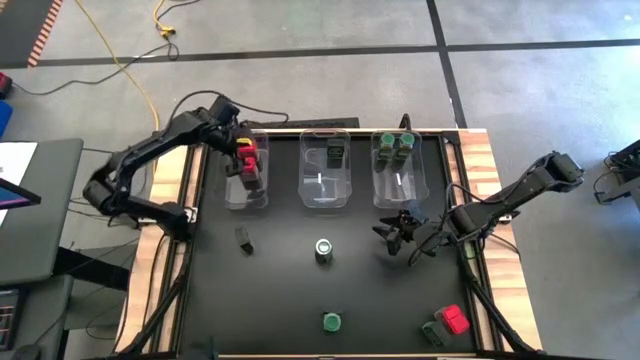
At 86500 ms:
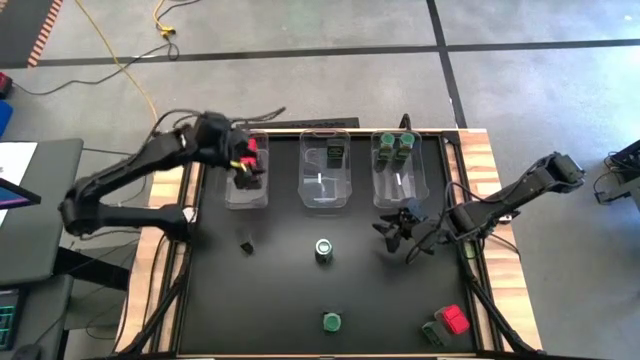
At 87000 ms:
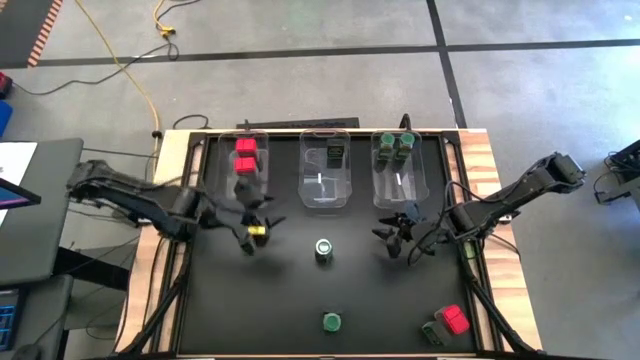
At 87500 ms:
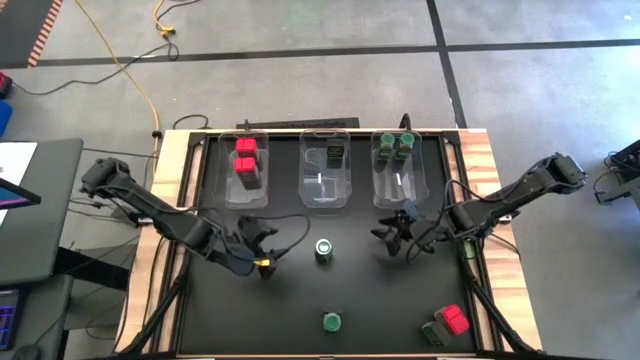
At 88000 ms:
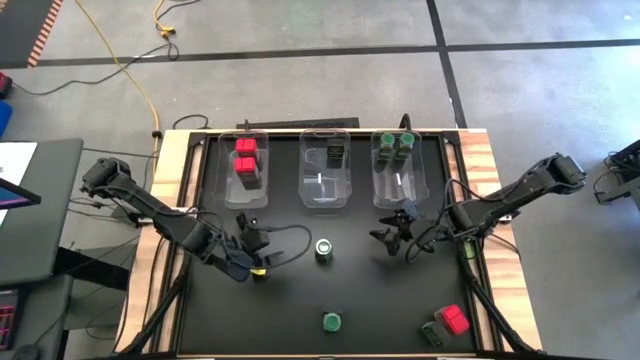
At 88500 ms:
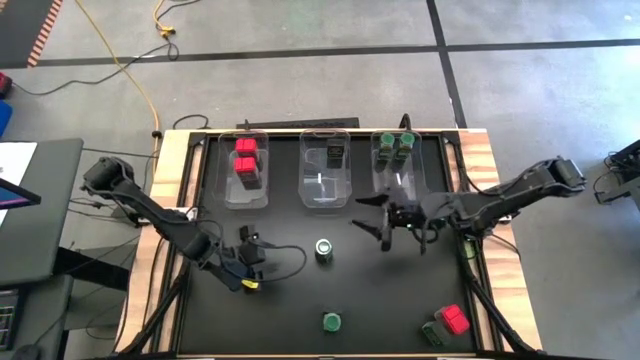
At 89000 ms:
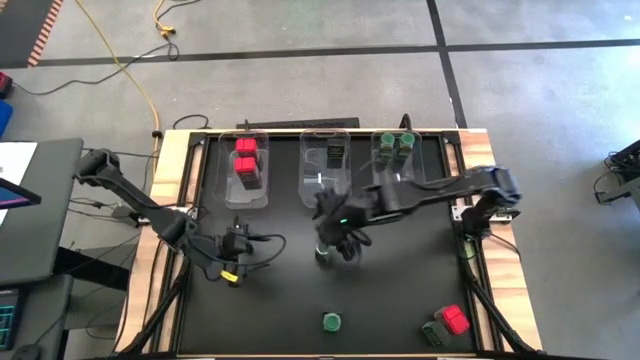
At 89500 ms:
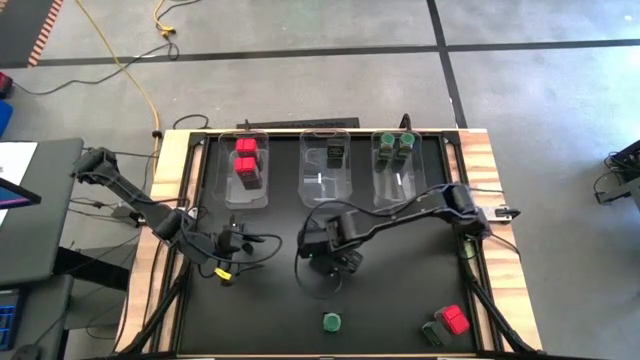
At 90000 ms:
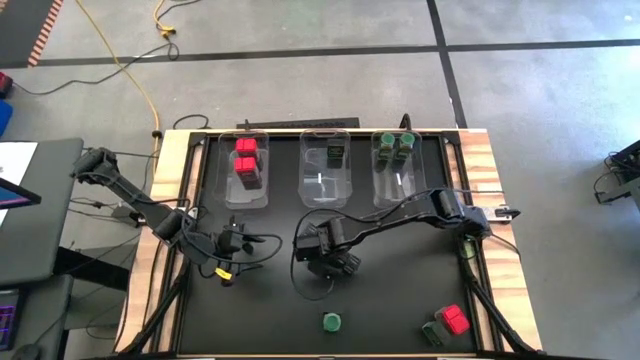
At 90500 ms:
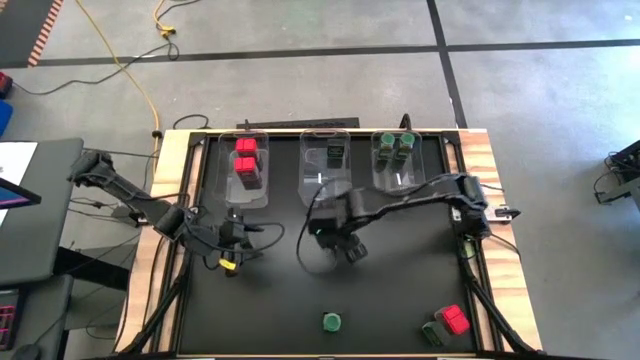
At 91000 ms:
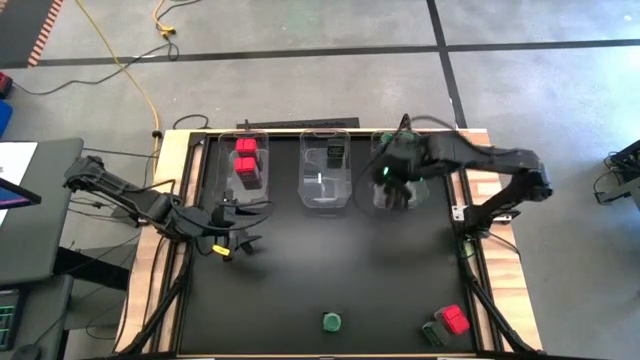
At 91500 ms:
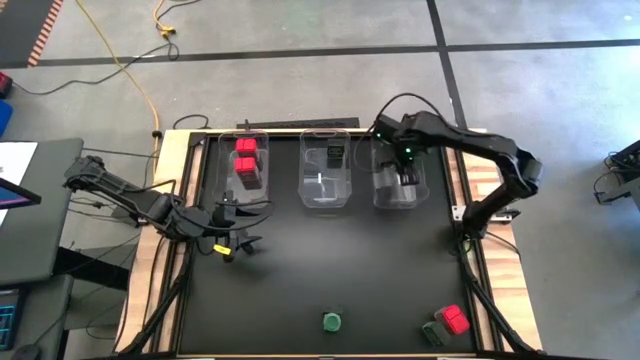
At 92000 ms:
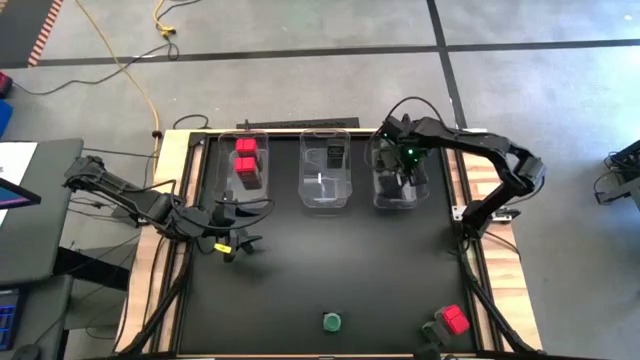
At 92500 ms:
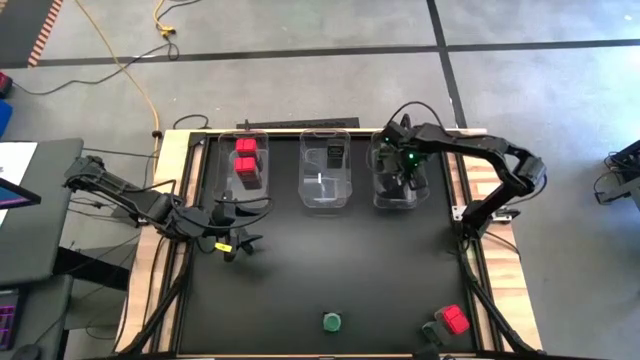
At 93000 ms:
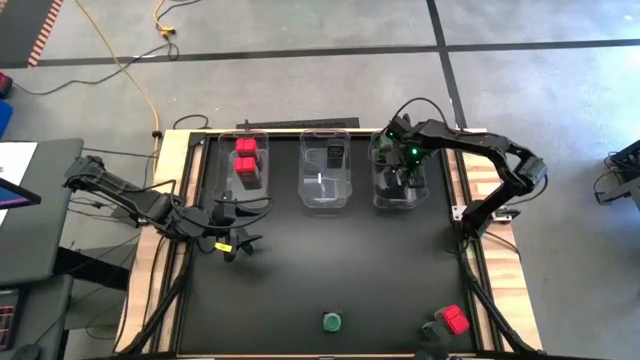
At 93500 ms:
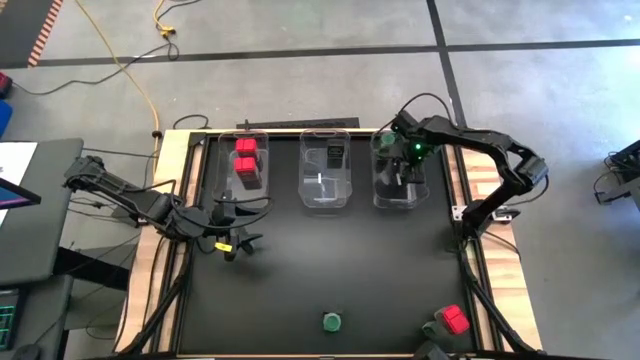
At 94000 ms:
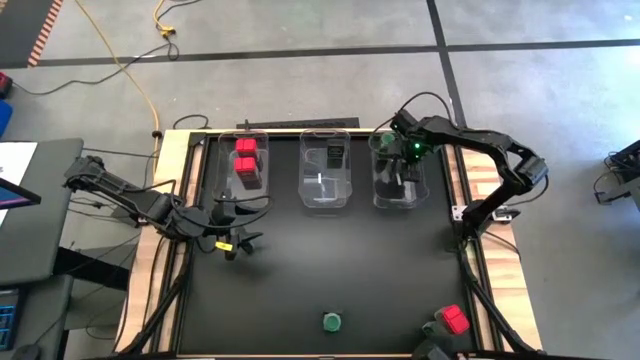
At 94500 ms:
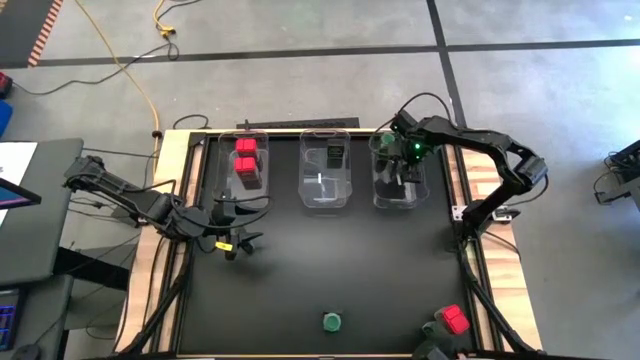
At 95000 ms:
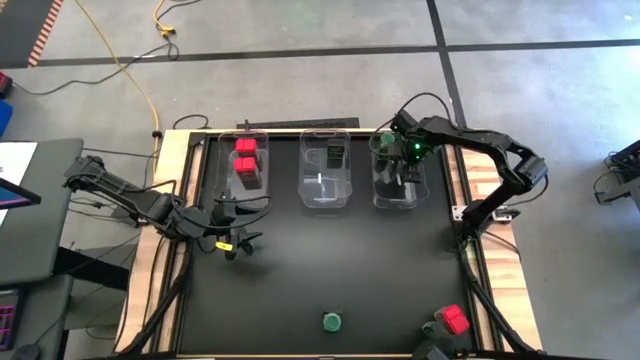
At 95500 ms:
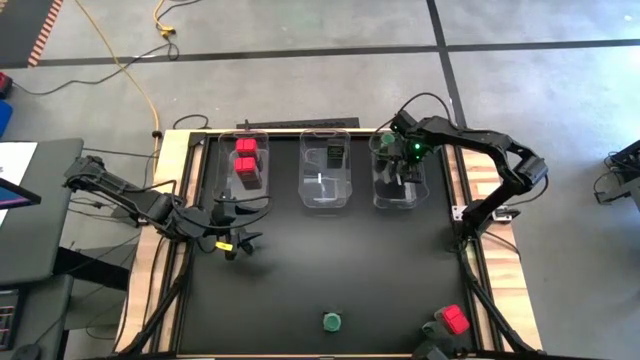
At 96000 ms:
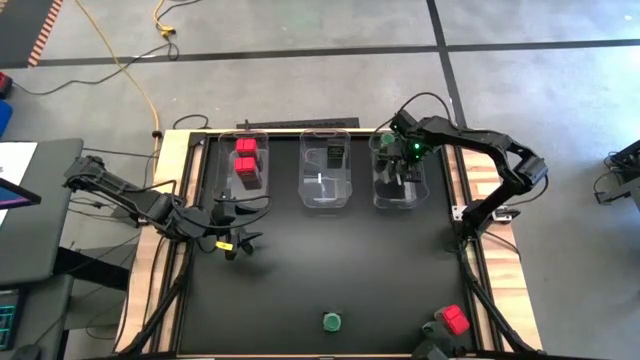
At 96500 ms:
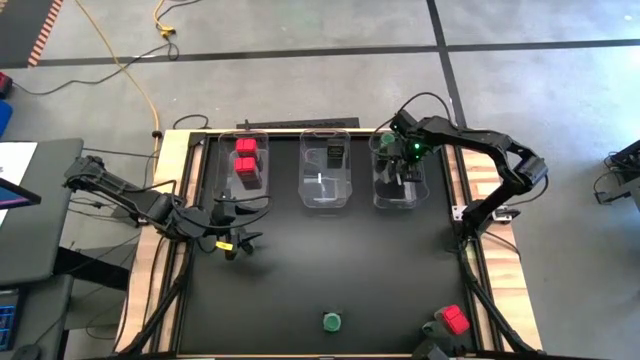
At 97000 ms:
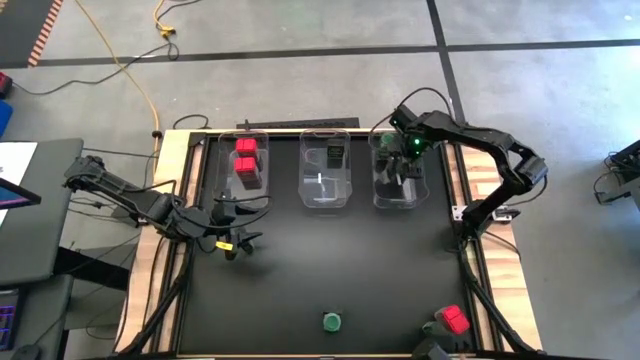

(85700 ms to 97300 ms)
Task: Sort spices by type
Put the green seasoning bottle into the right transparent bin

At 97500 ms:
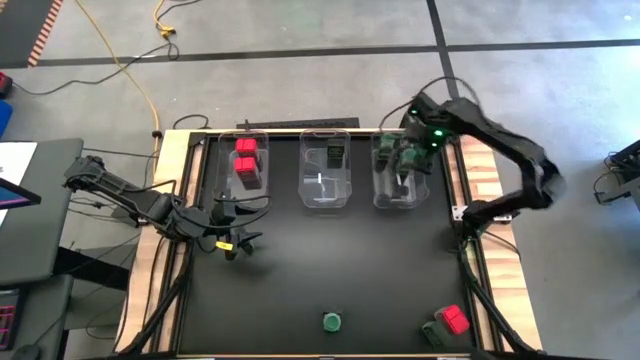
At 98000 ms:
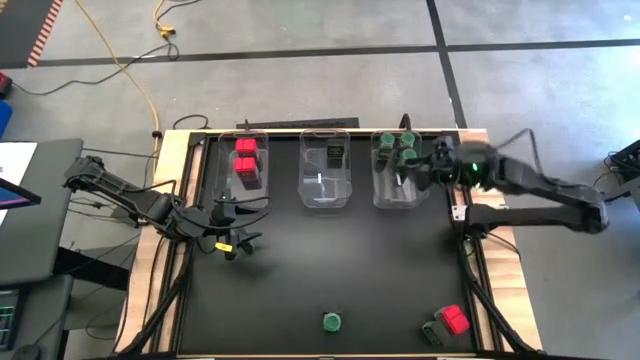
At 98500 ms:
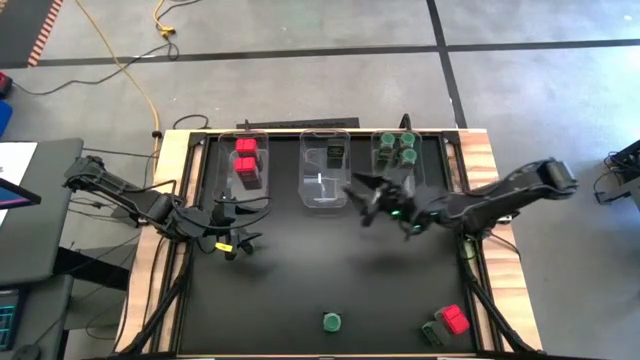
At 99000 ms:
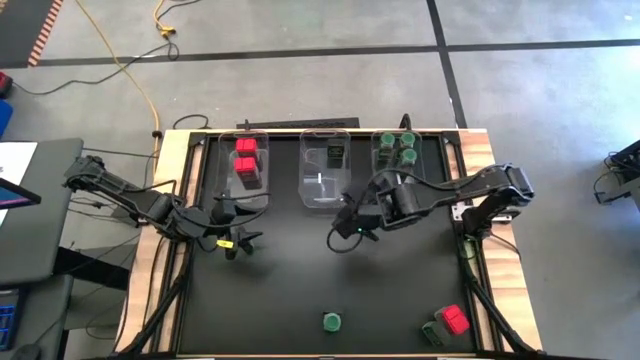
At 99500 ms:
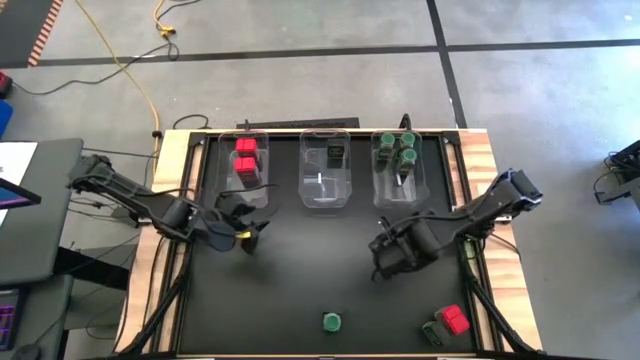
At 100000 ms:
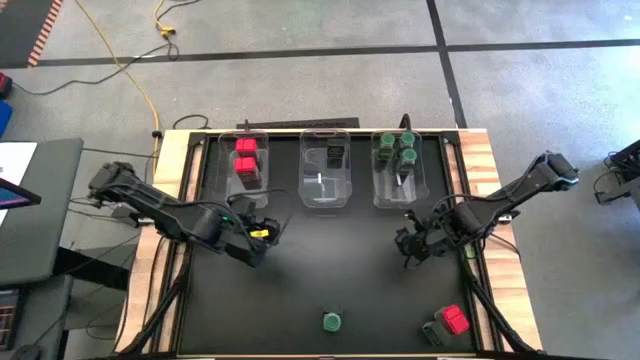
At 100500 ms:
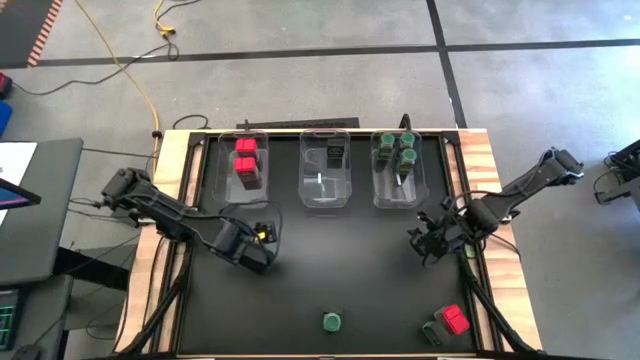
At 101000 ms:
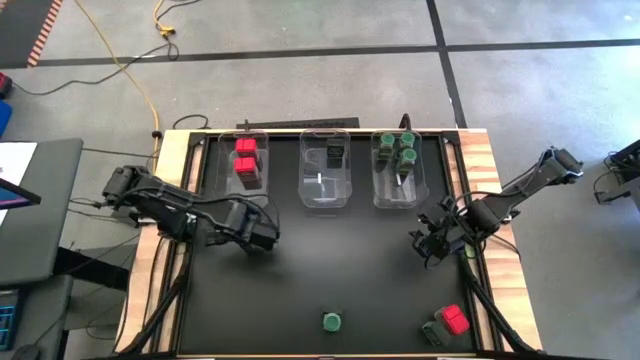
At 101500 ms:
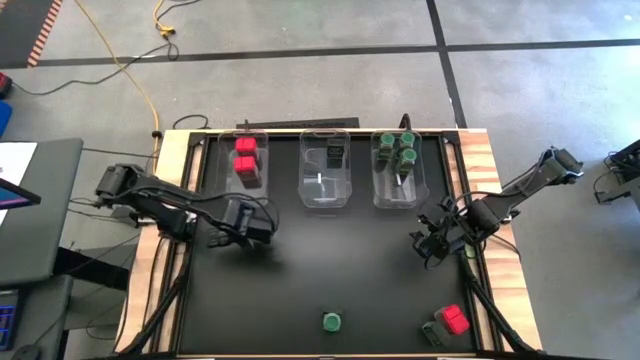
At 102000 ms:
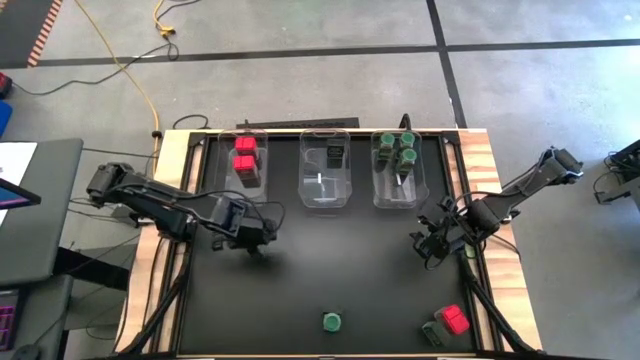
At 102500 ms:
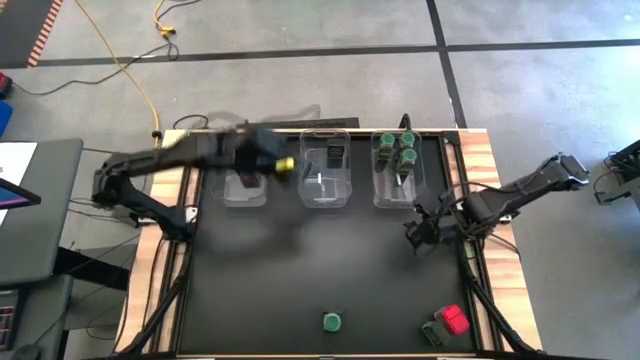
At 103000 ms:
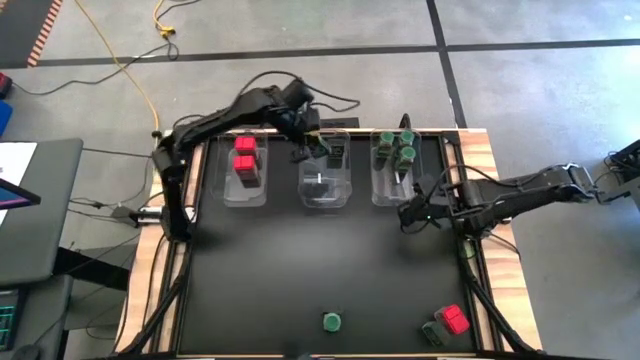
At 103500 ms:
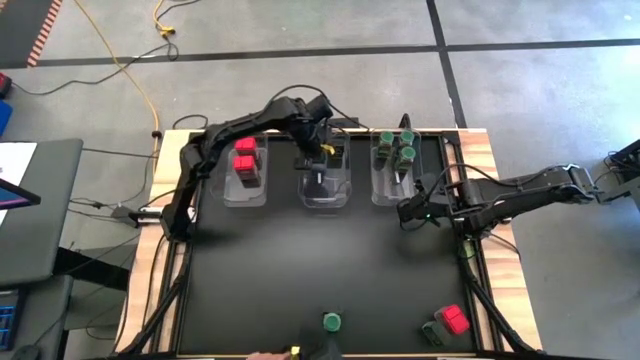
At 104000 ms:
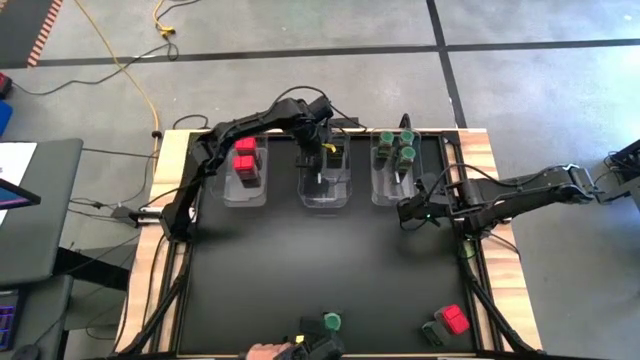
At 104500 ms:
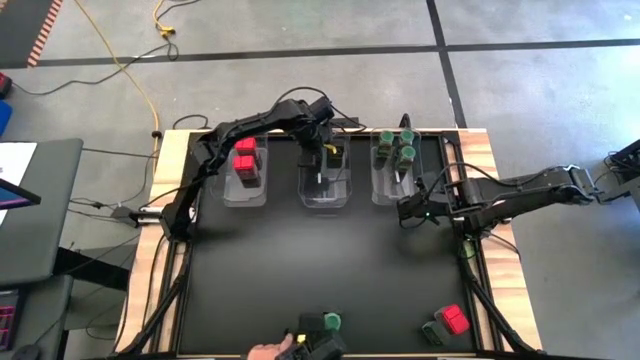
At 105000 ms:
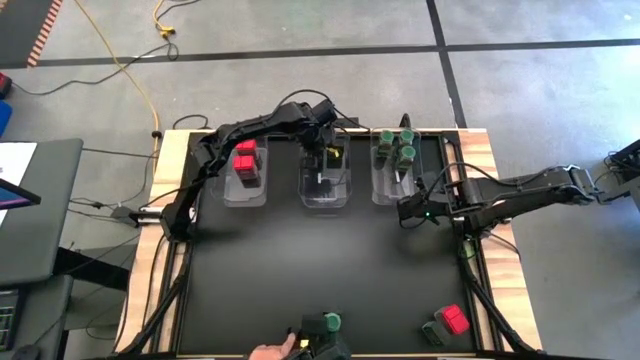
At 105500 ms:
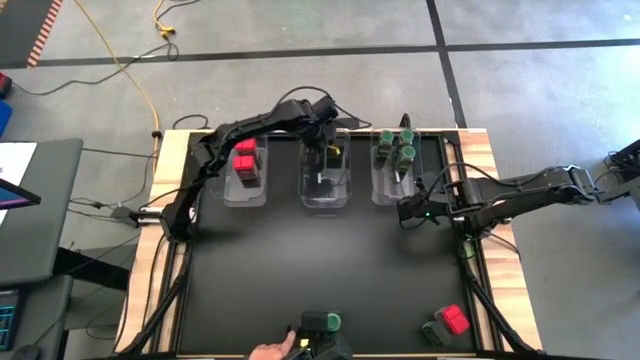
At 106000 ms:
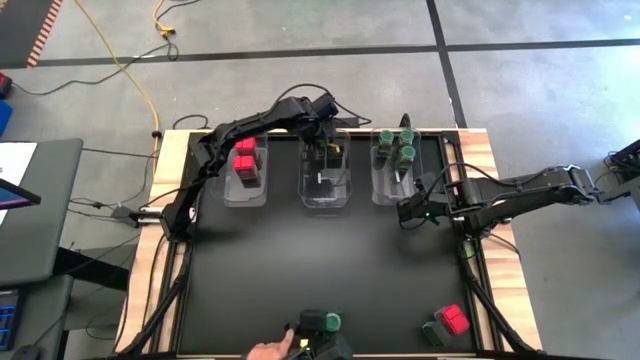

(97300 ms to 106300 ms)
Put the black seasoning can into the middle transparent bin

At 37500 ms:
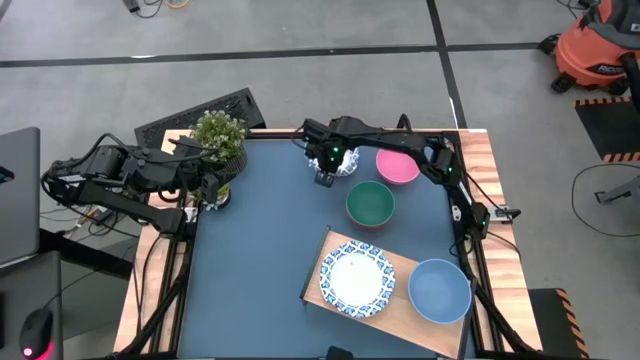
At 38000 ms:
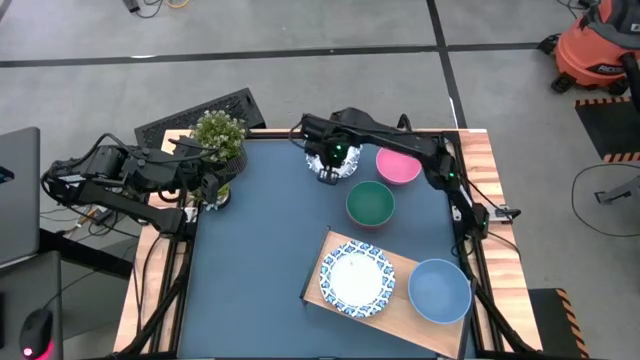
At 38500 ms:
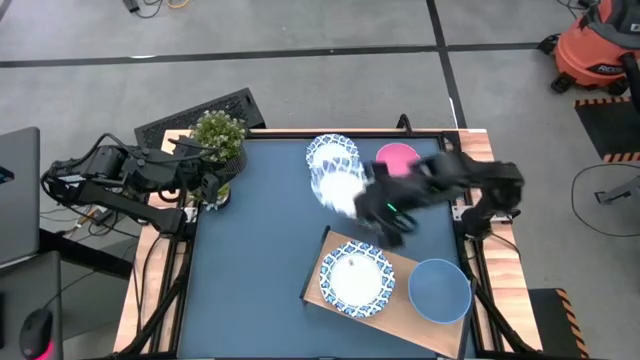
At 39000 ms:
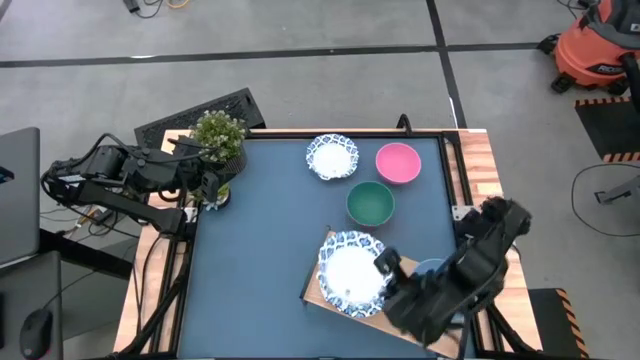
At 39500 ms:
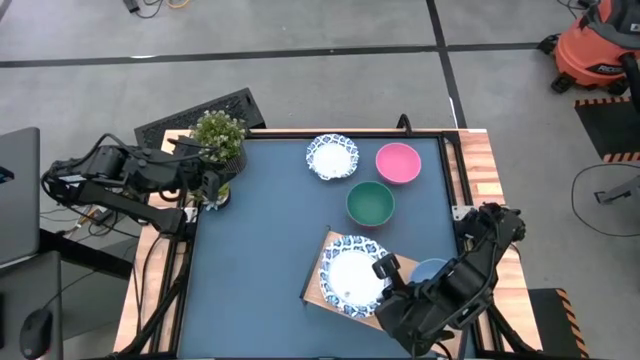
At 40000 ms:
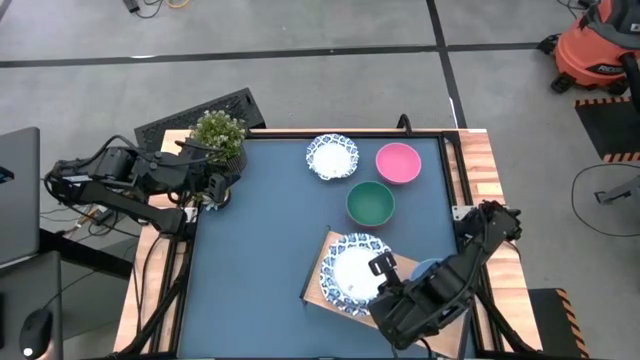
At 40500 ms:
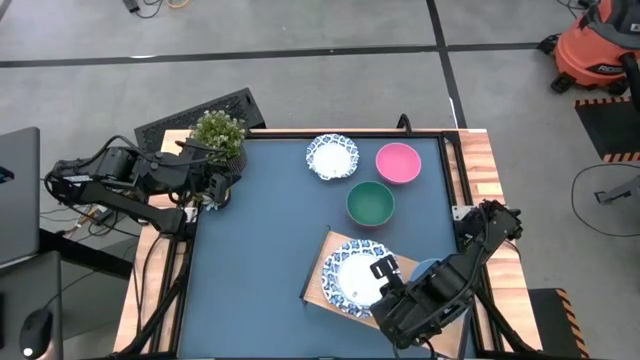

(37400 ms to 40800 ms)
Task: Place and stack bowls onto a shelf
Stack the white bowl on top of the white bowl on the shelf
